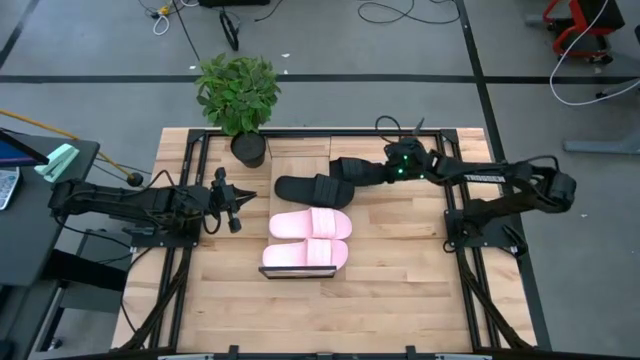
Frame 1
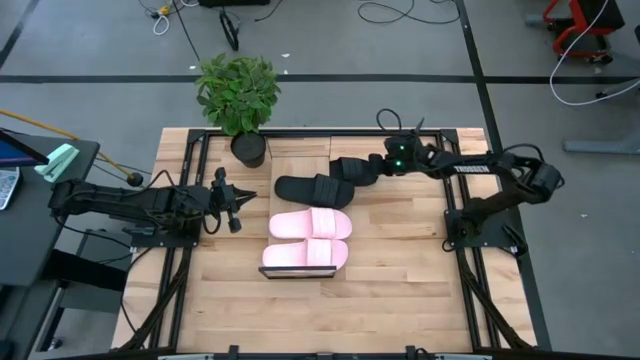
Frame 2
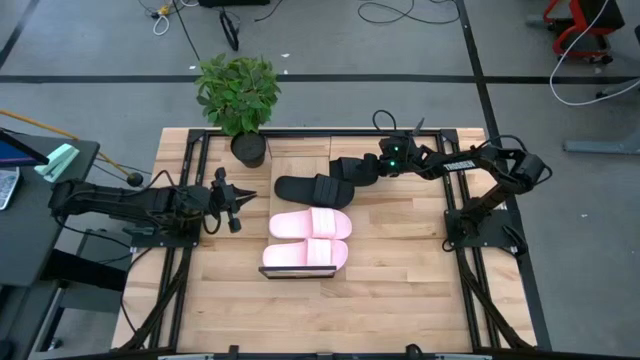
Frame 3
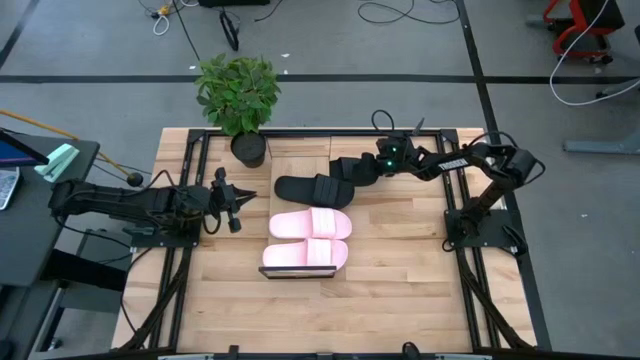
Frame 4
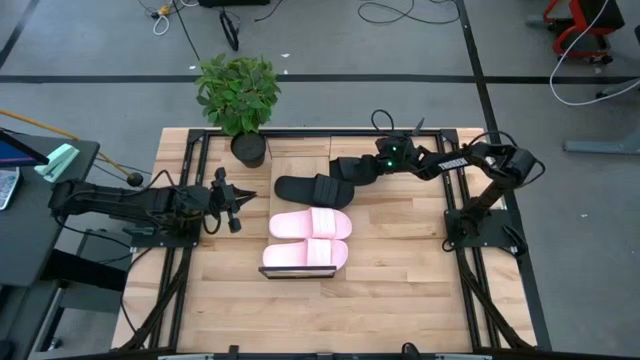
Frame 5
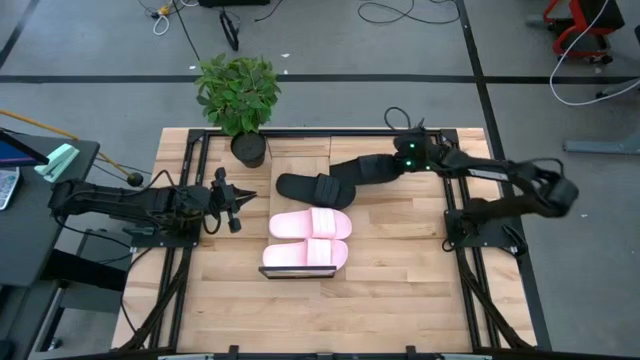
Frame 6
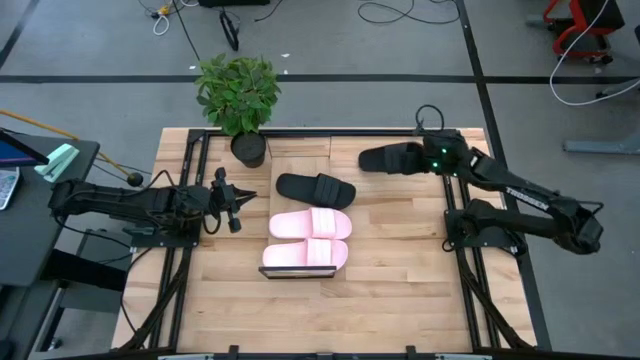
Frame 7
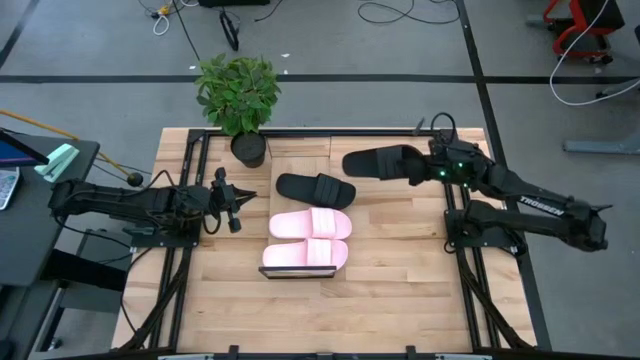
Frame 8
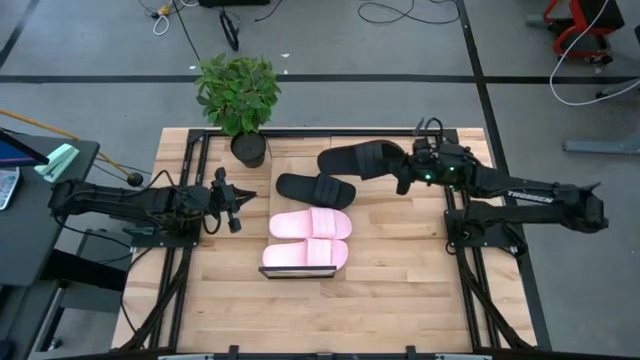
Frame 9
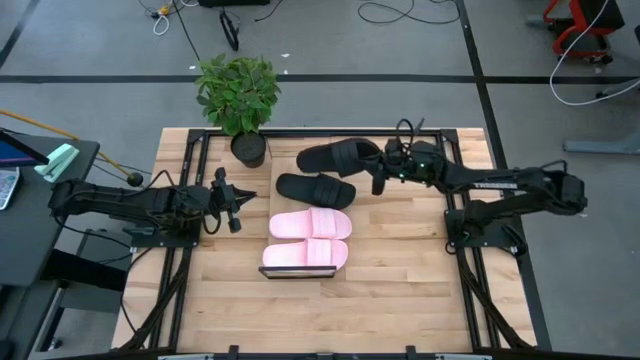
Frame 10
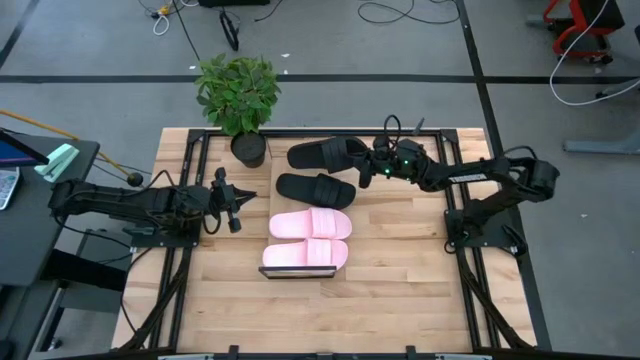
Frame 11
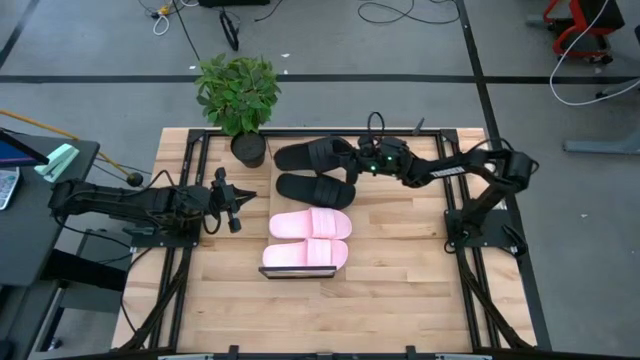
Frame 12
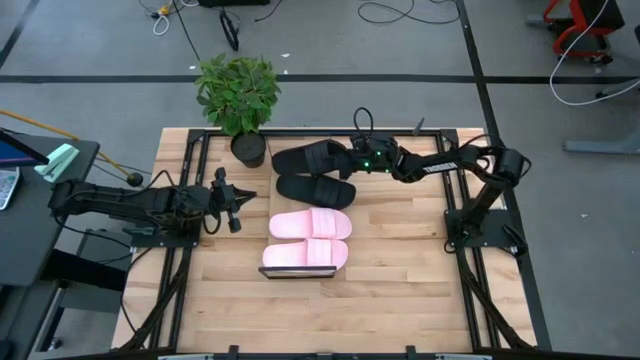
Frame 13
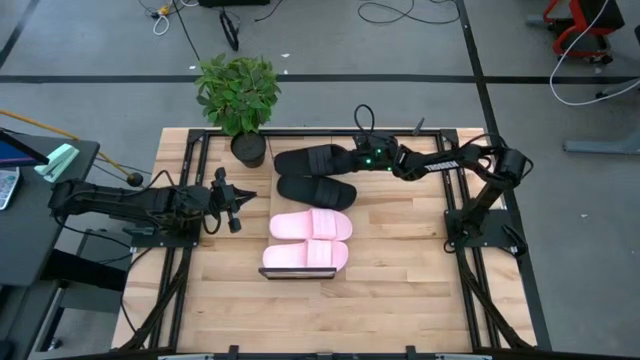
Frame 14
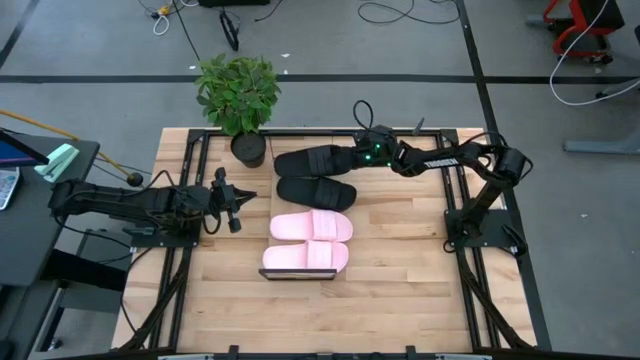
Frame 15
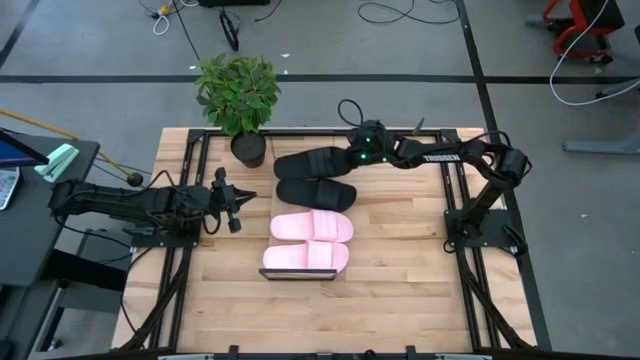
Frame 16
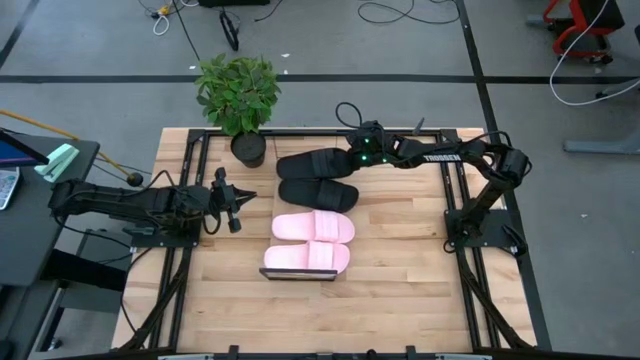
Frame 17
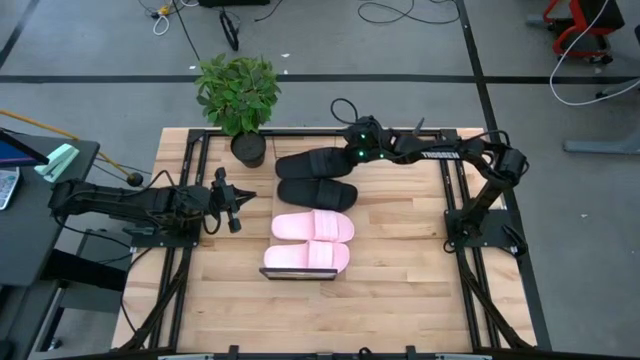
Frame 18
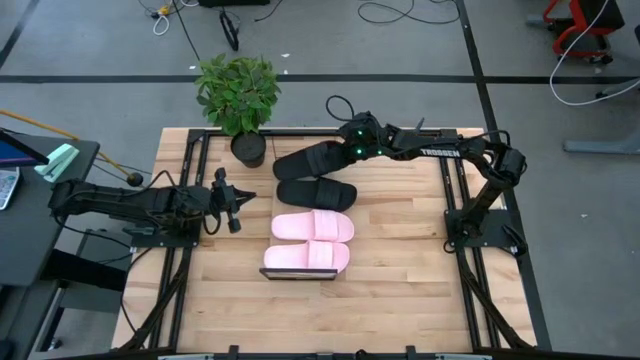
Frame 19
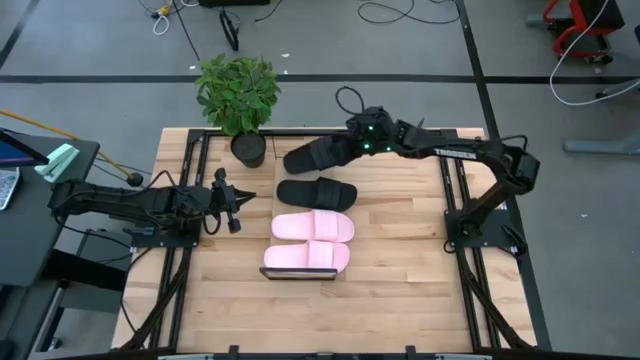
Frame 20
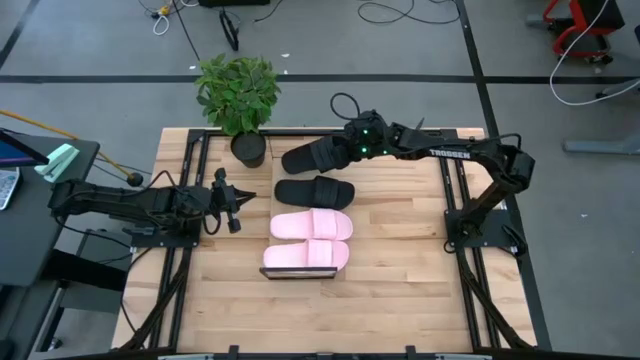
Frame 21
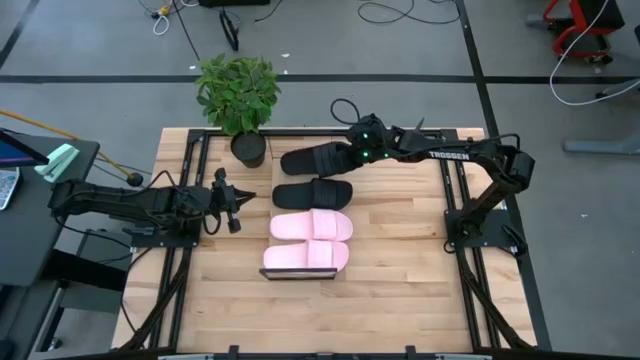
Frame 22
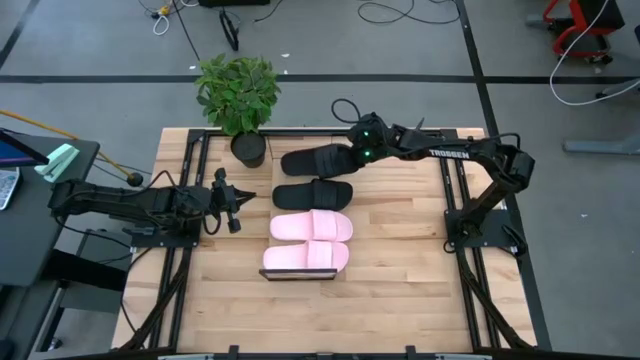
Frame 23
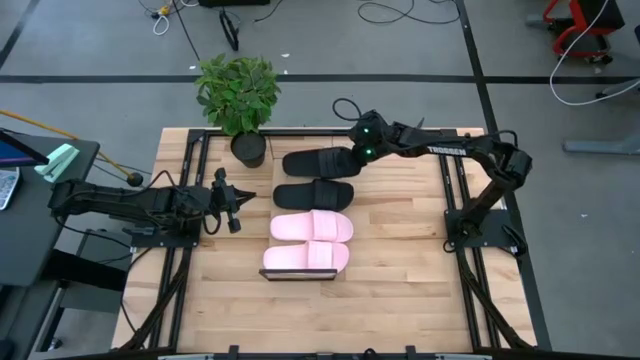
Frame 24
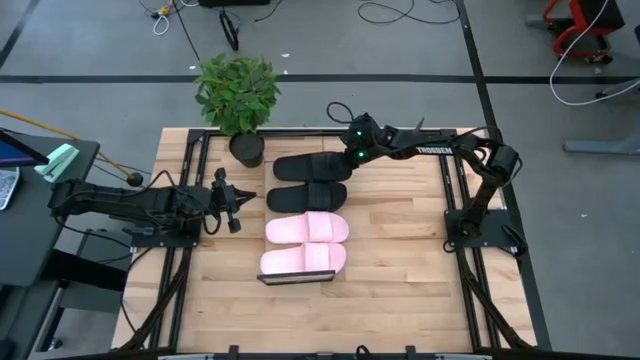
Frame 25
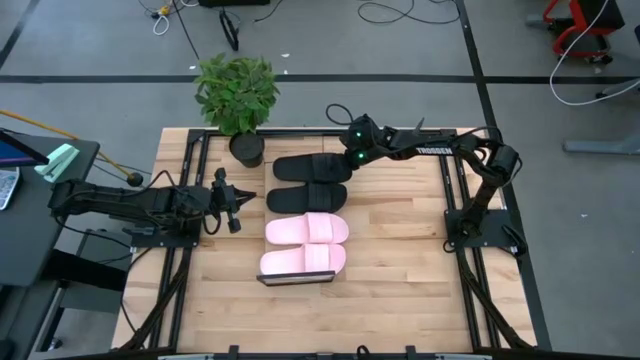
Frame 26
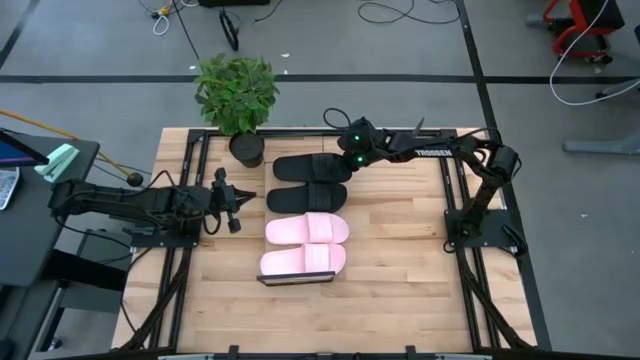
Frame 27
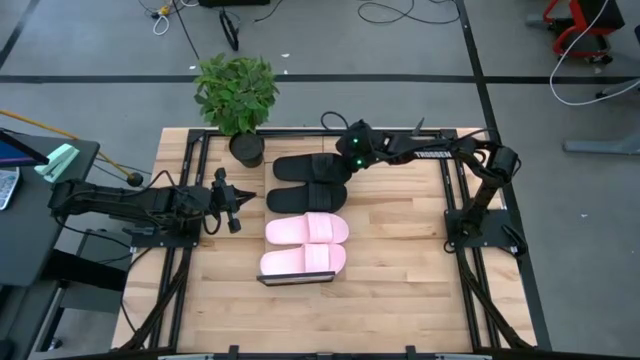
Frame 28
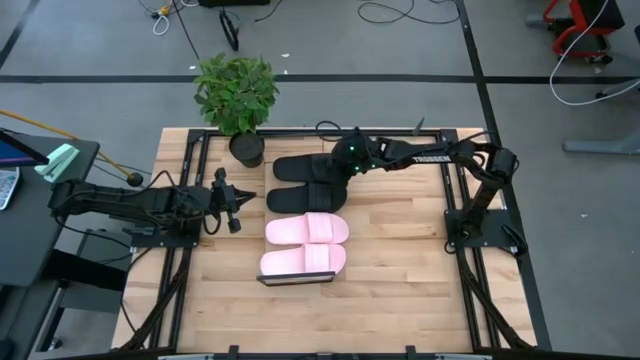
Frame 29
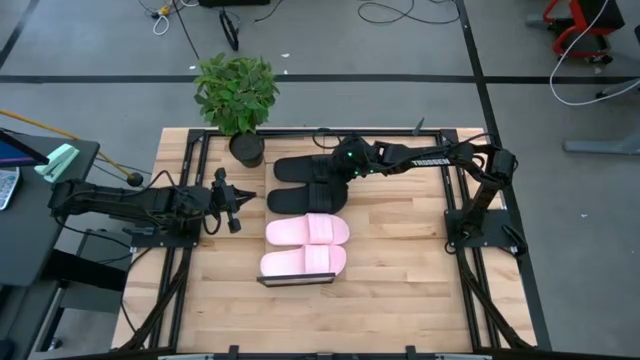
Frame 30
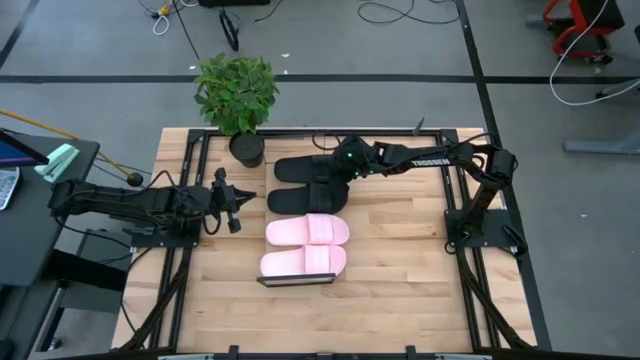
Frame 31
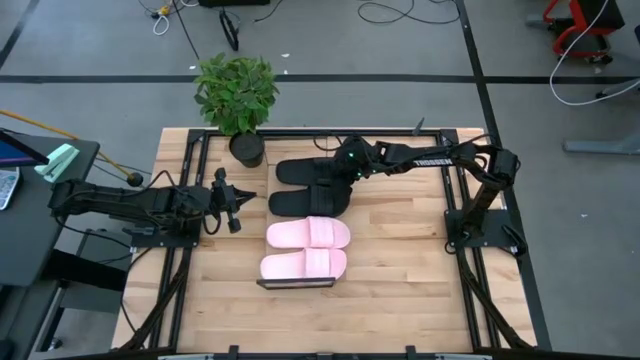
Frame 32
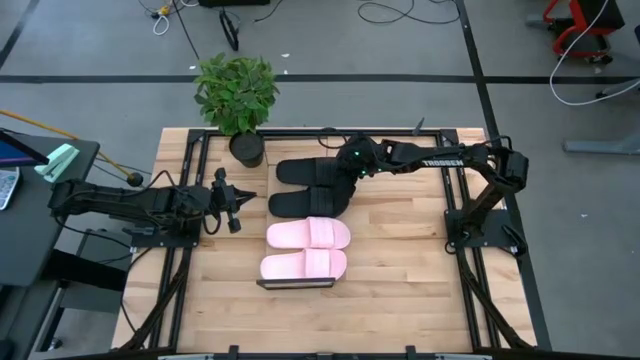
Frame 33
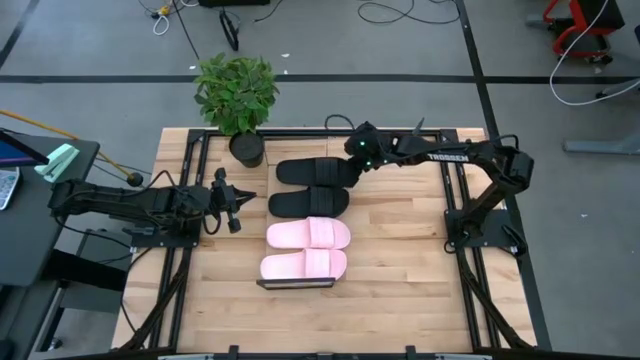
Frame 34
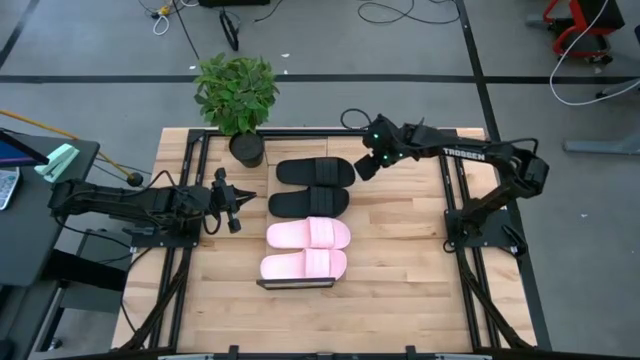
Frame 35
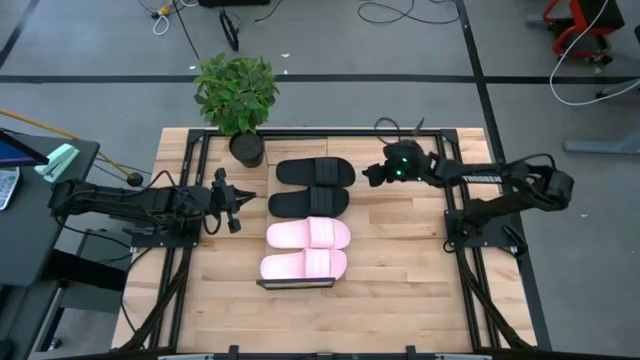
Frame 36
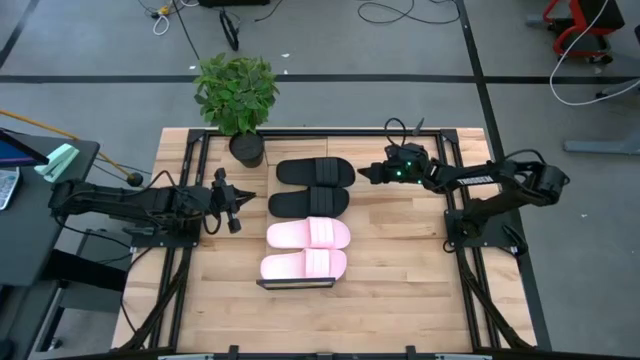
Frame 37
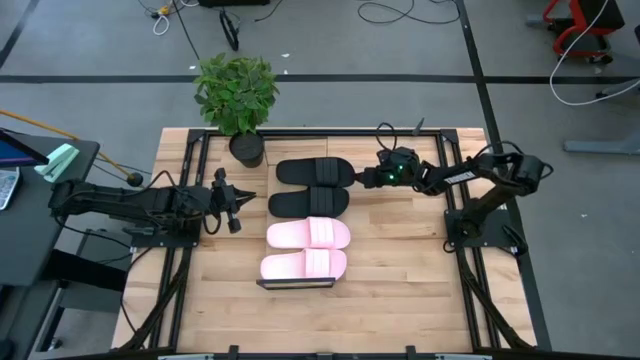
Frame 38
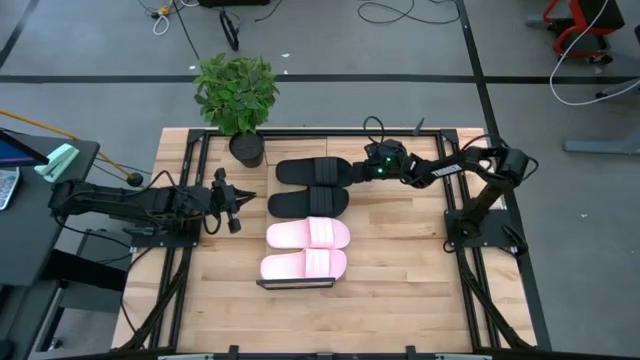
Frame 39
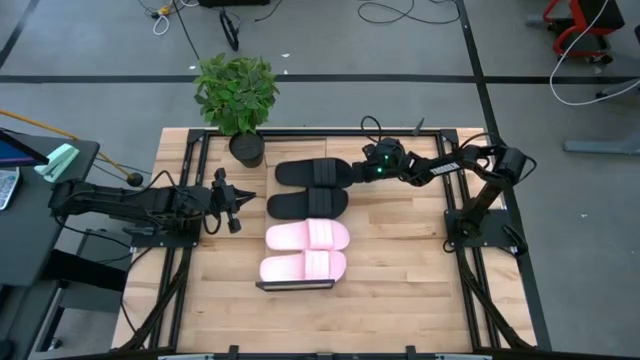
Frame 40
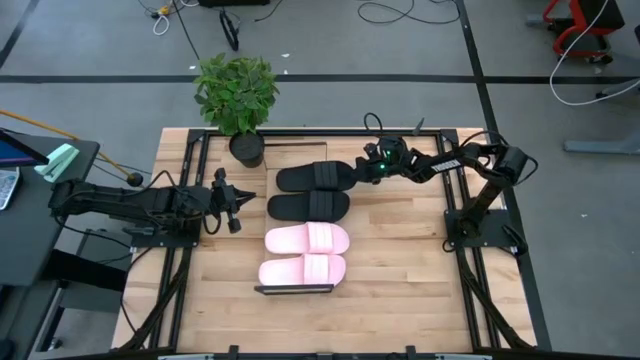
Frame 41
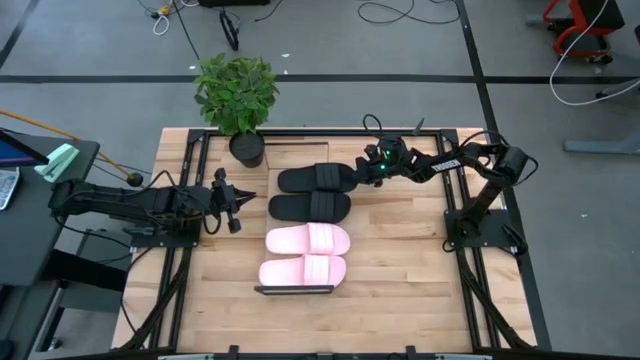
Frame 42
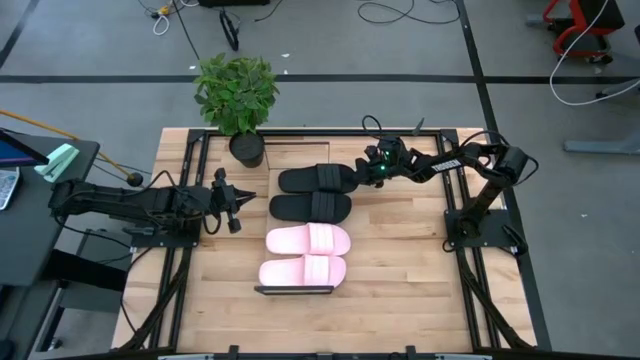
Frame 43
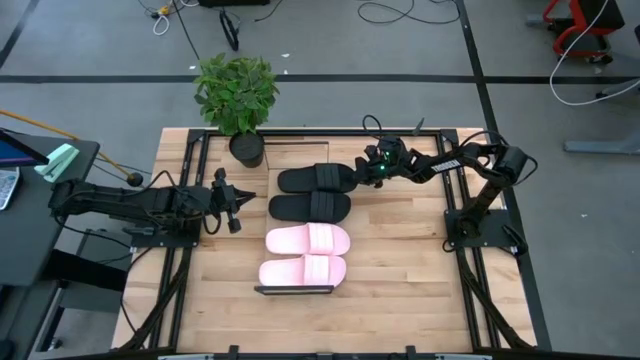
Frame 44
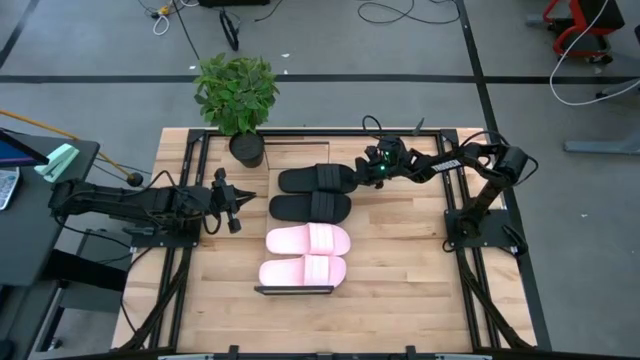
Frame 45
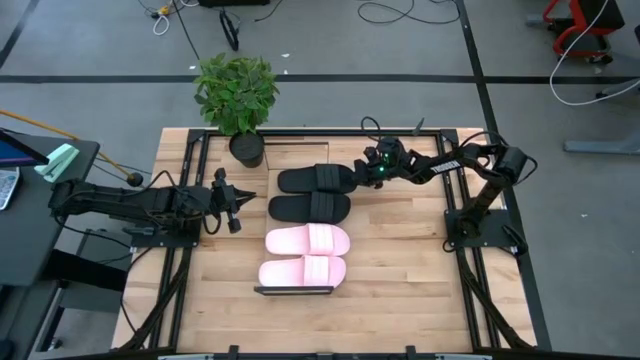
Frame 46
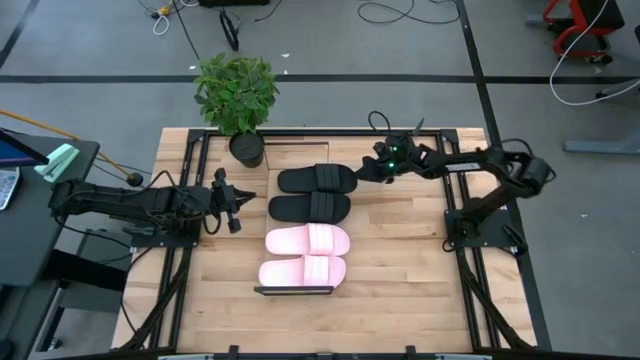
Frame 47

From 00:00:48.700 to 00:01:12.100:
Task: Pick and place slides into the shelf
Put the black slipper on the shelf
